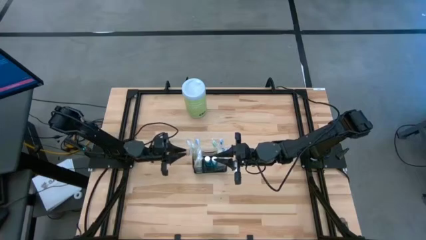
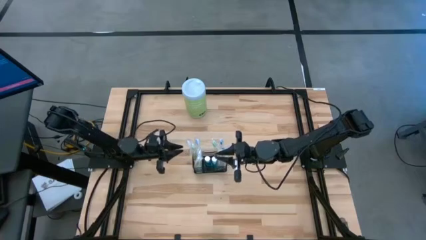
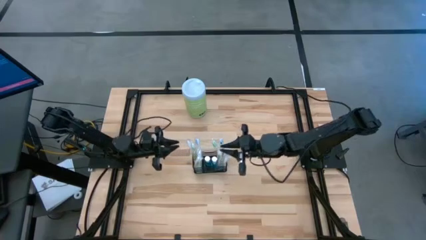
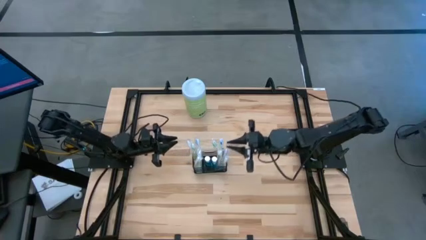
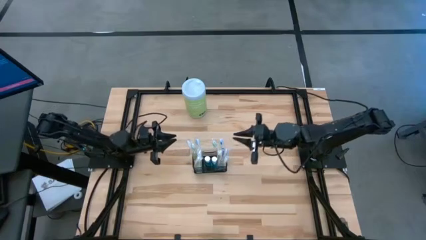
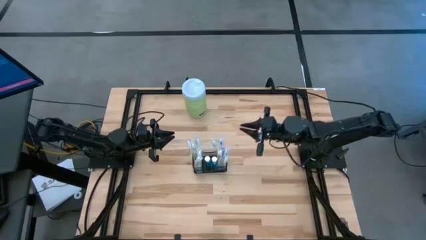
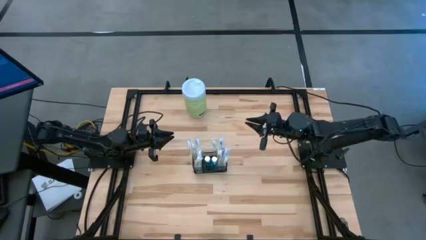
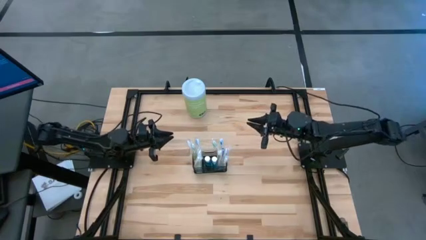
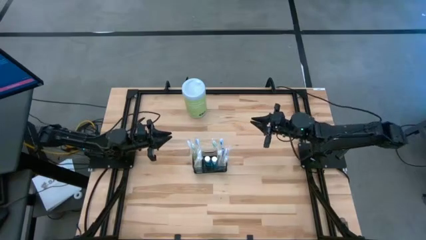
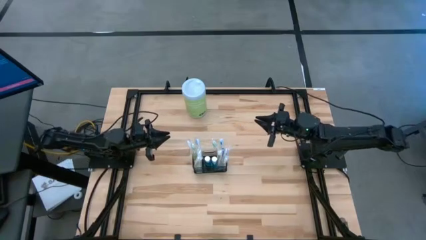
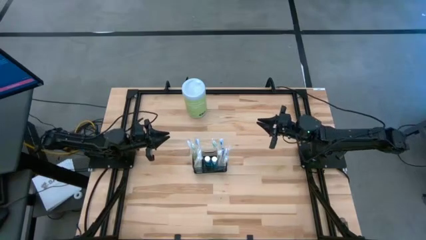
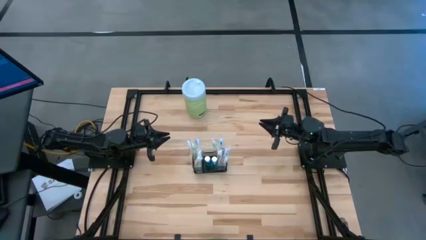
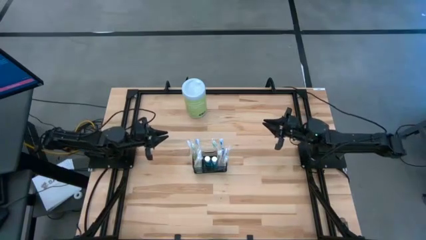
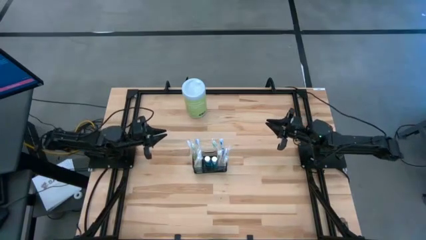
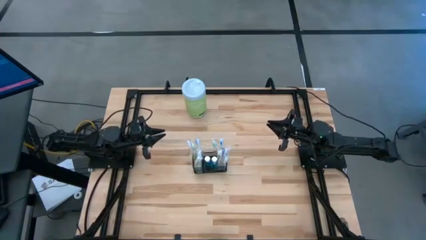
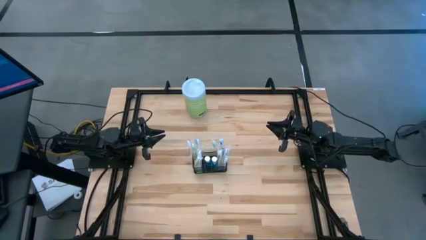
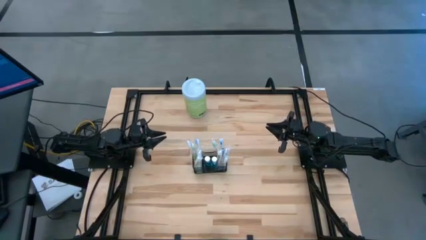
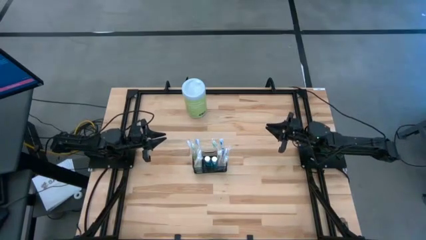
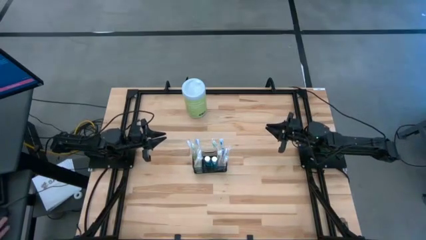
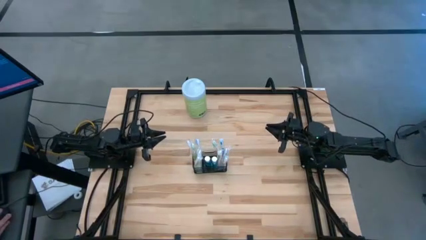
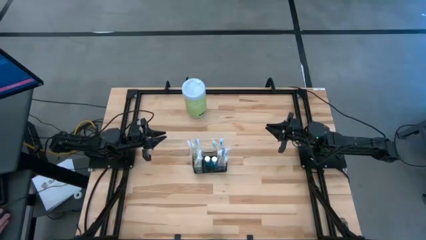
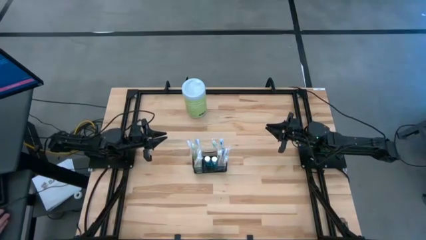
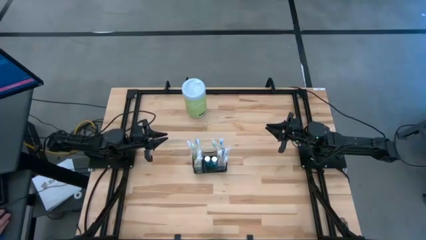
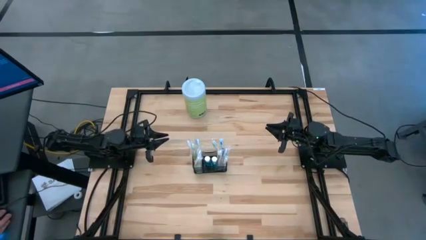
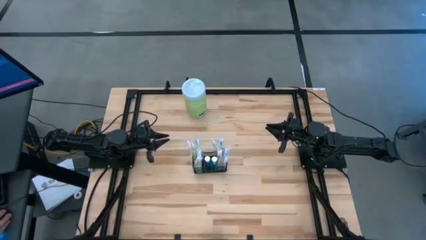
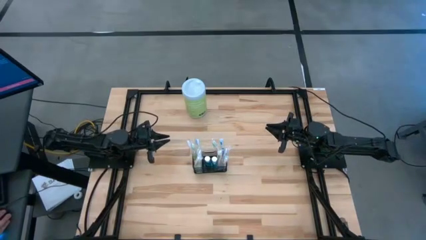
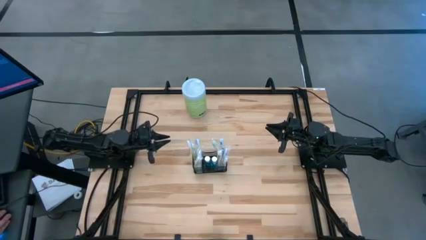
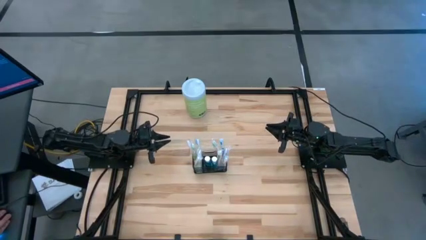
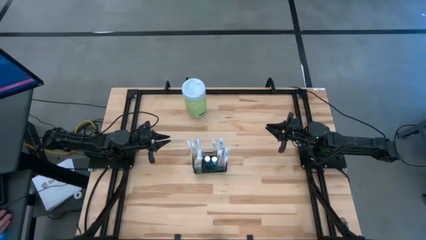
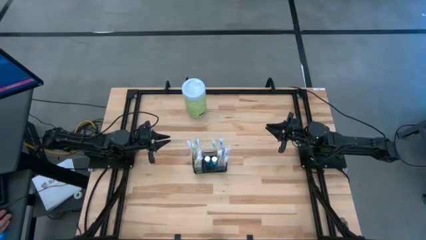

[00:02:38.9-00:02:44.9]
Task: Pick & Place toothbrushing station
Return to Home Position

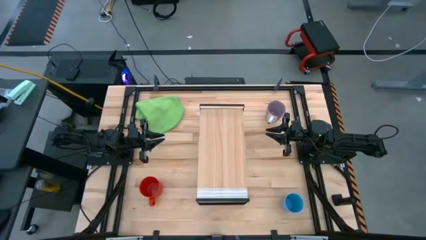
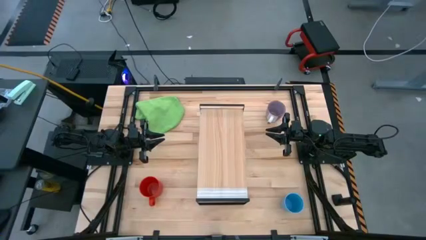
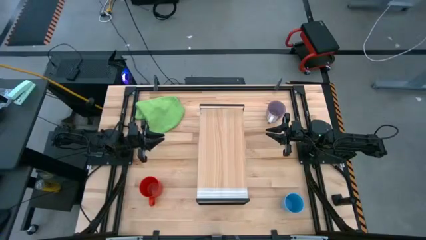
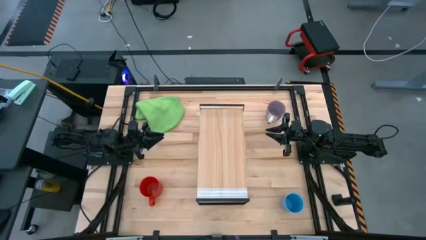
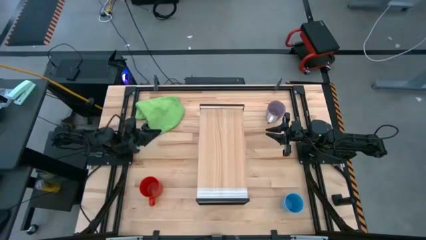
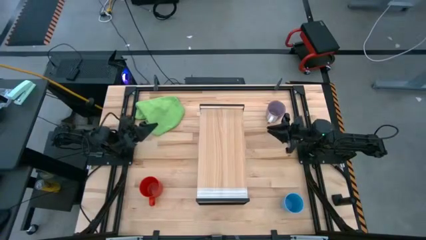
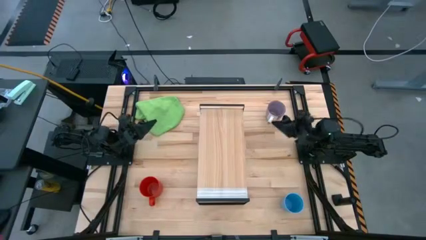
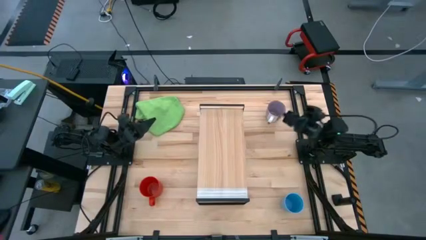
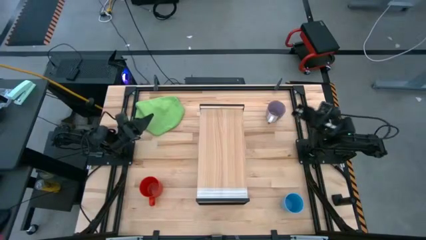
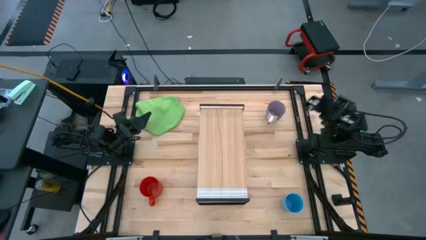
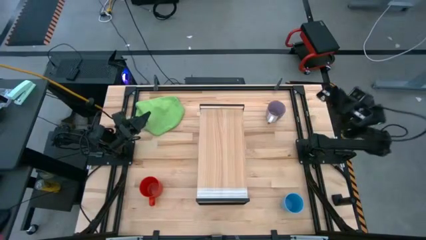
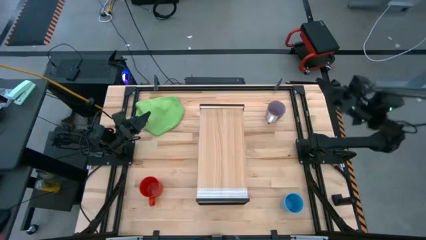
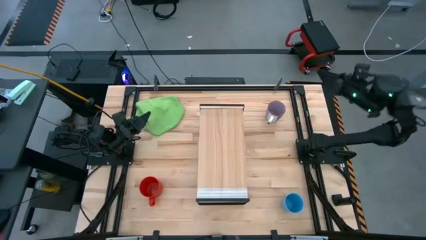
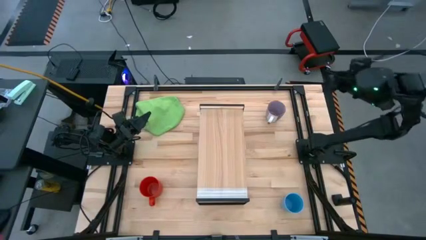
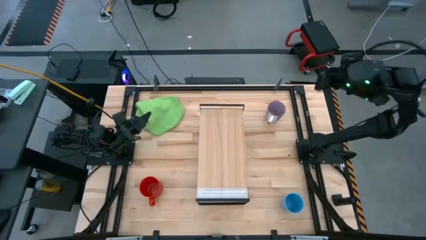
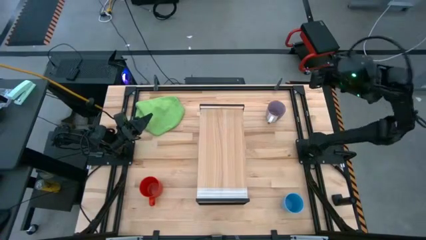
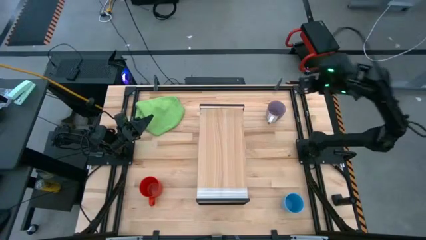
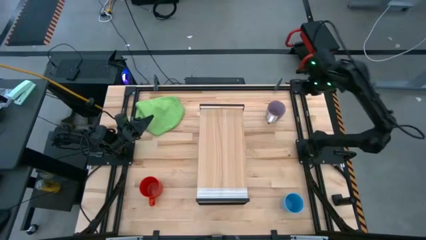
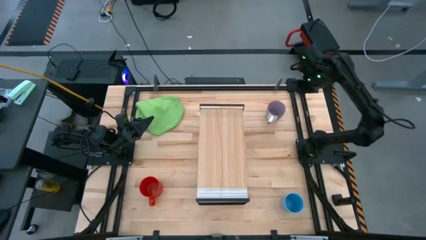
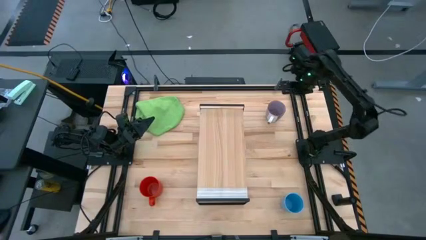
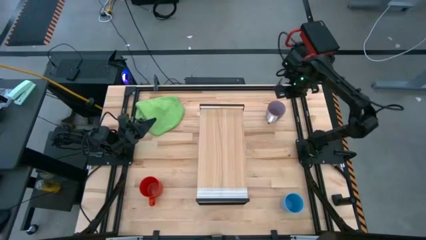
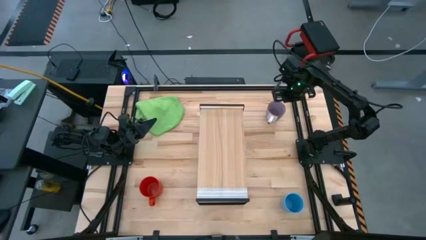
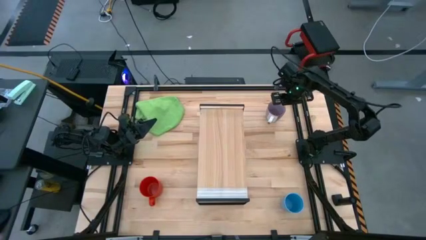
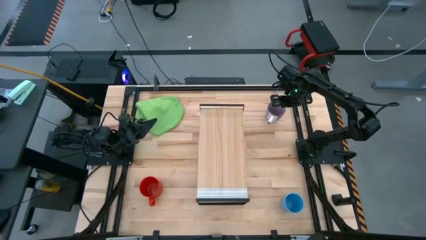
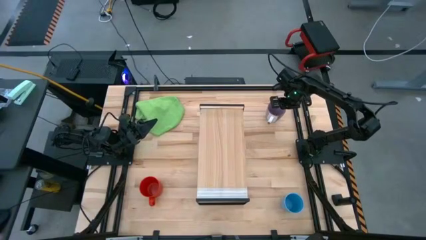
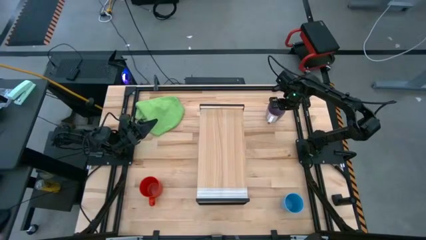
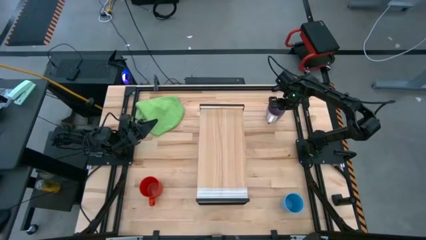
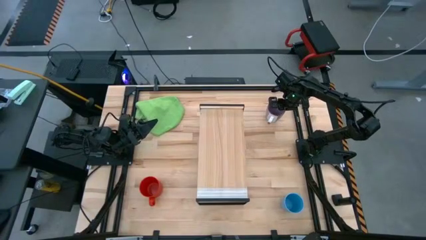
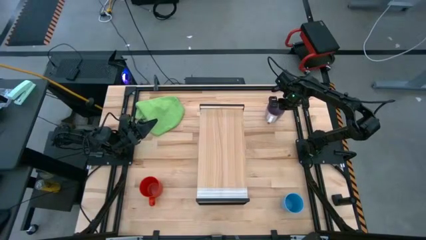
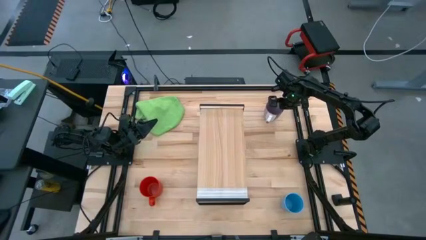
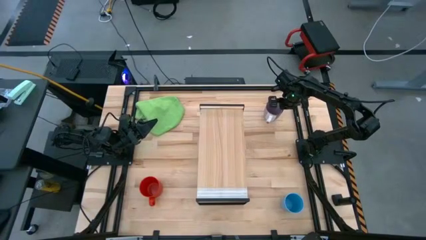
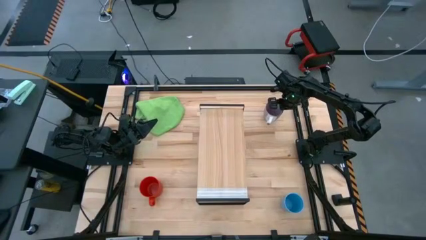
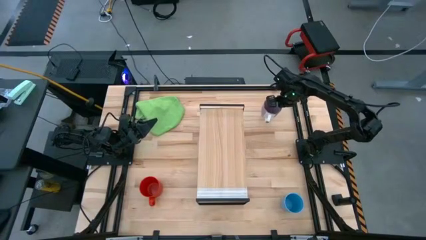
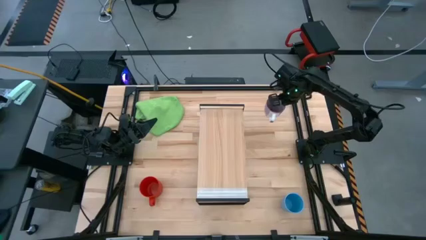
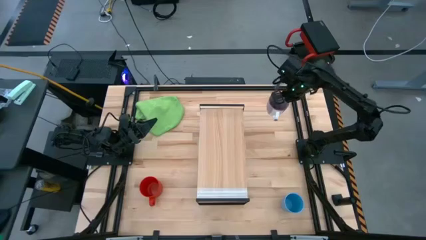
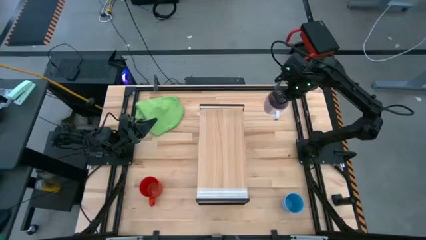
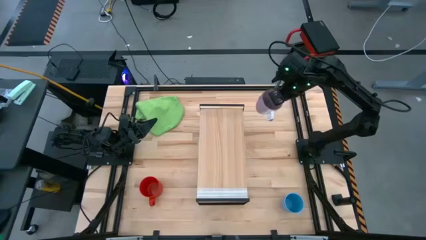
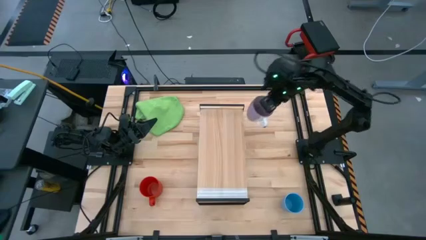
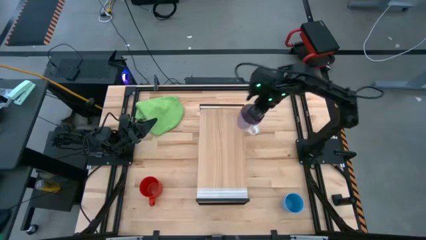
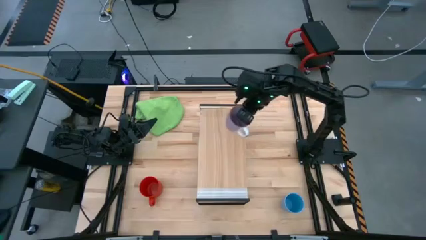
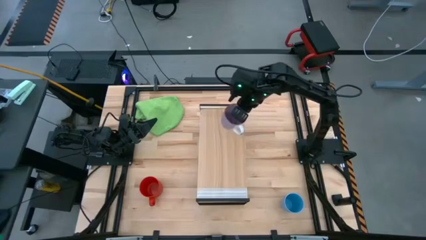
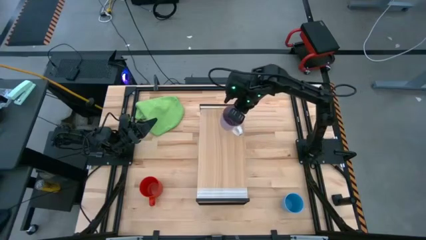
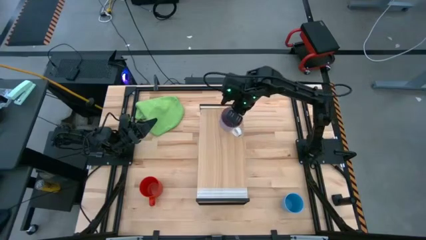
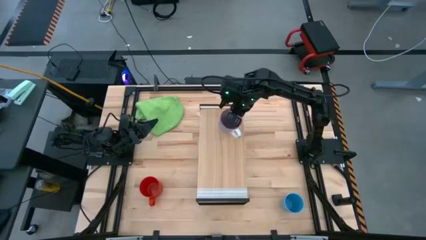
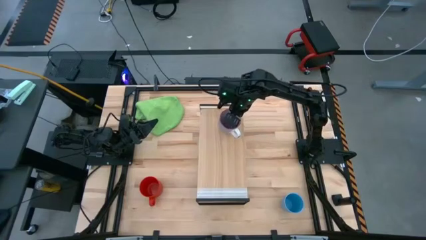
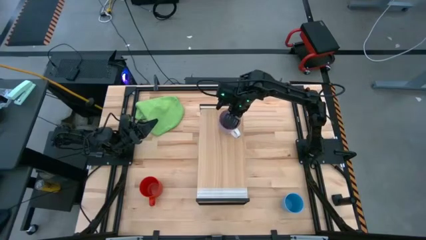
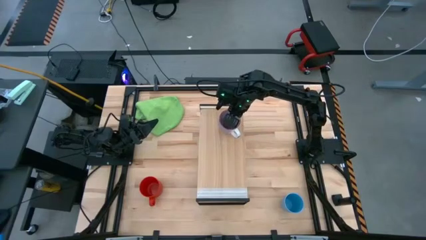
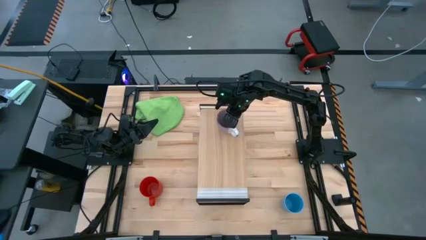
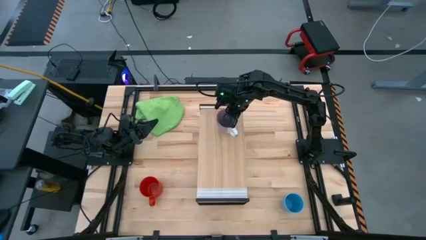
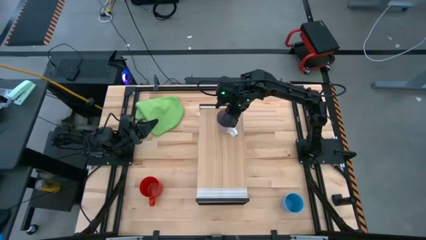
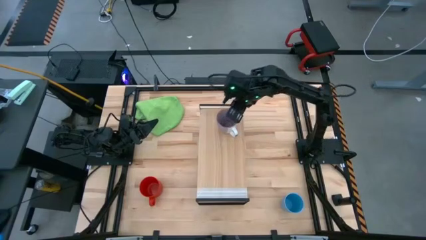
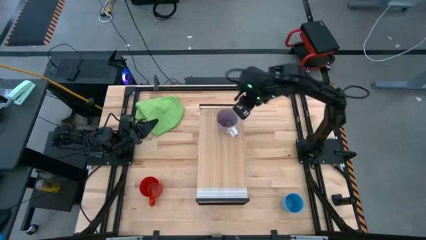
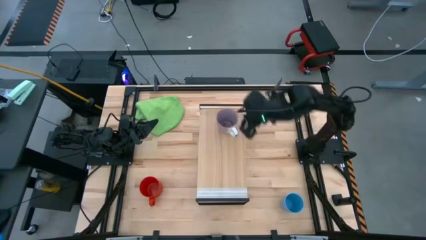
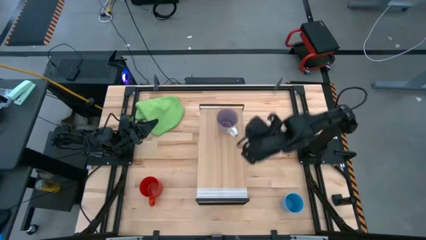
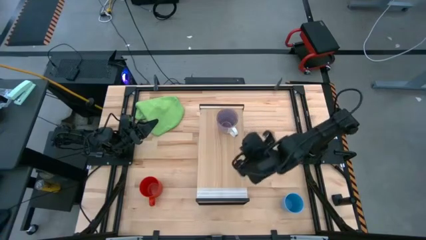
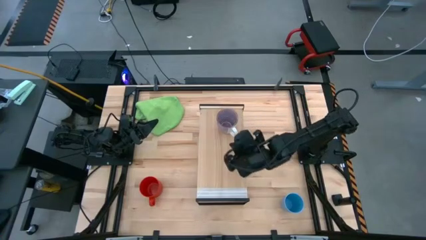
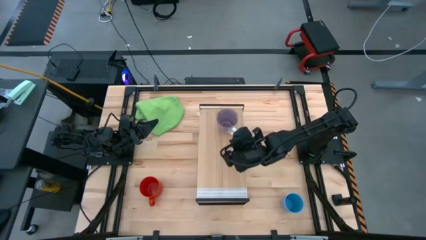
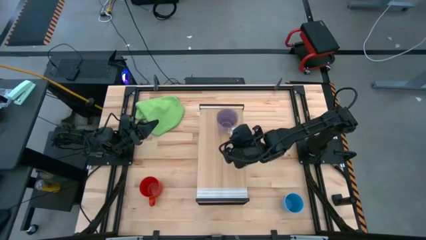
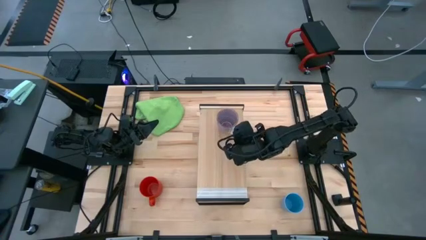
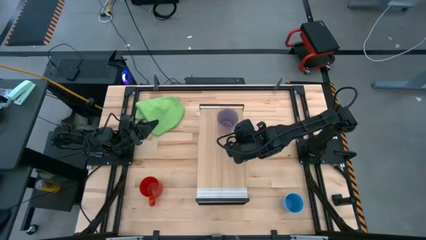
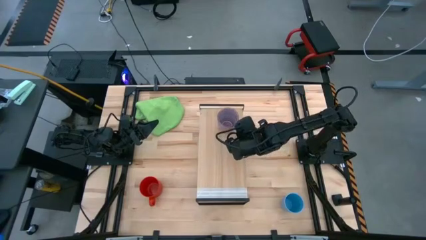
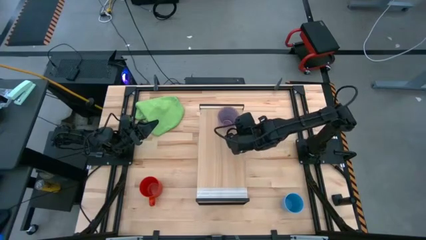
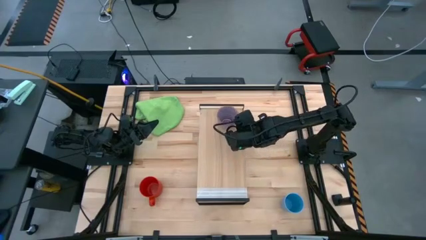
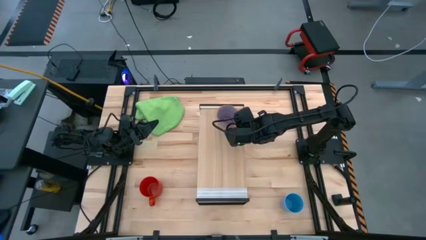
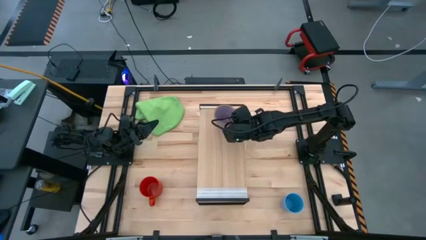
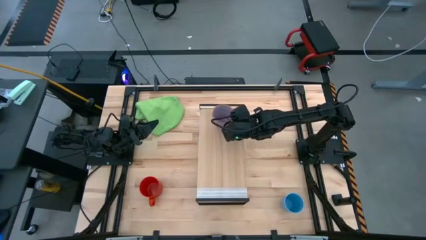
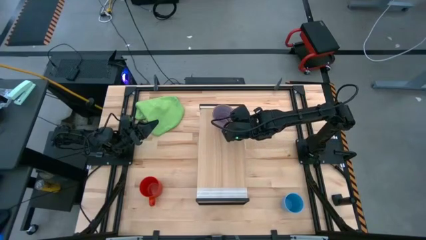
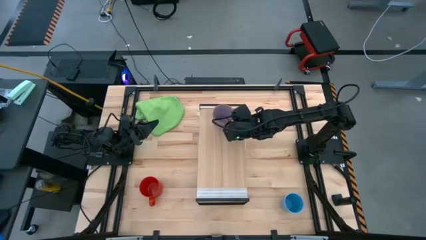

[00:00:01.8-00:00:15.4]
Task: Stack small to large cups/mugs on shelf
Put the violet mug on the shelf
